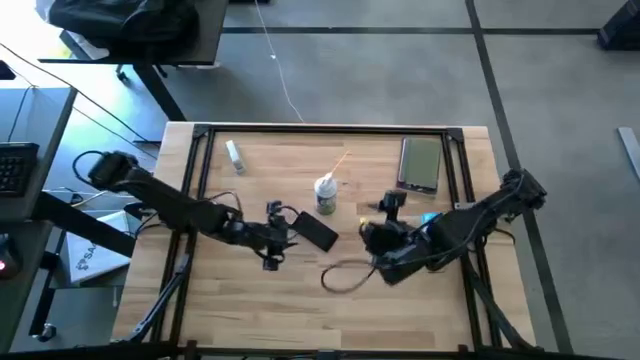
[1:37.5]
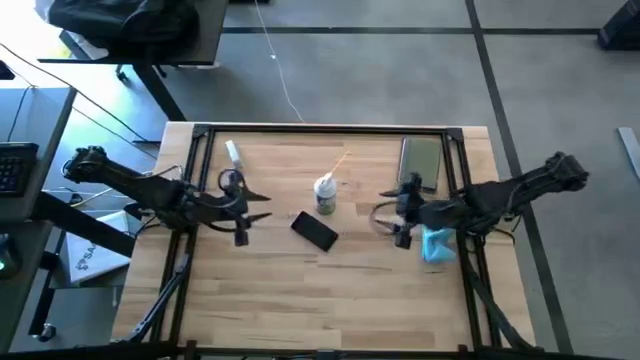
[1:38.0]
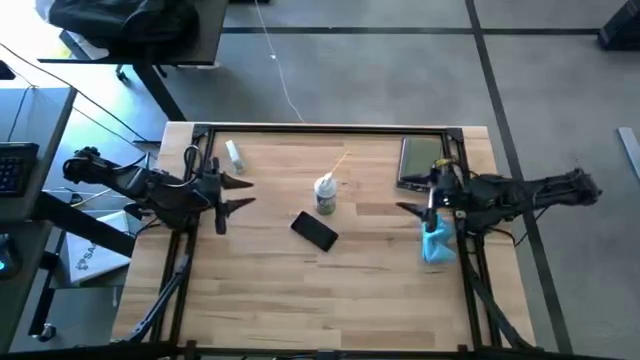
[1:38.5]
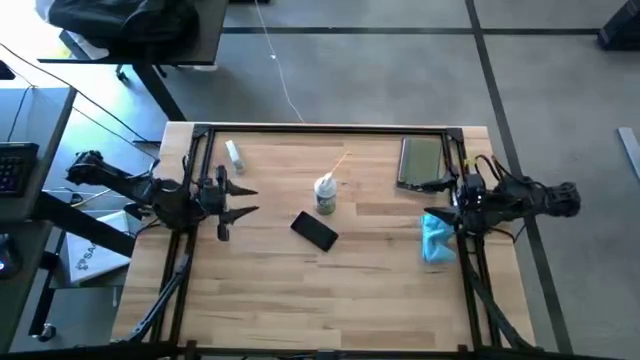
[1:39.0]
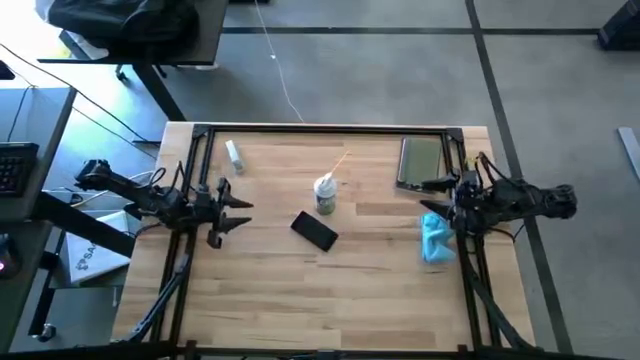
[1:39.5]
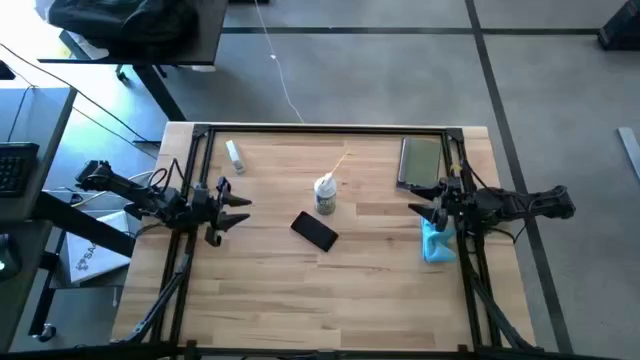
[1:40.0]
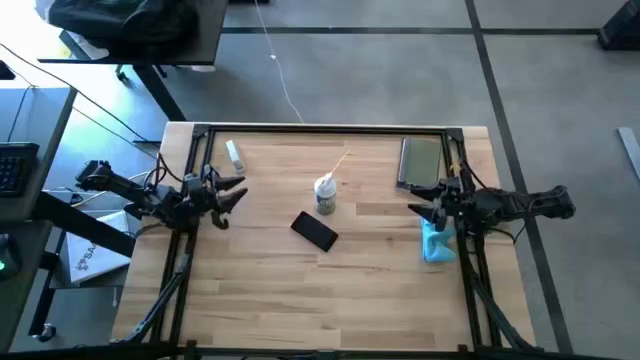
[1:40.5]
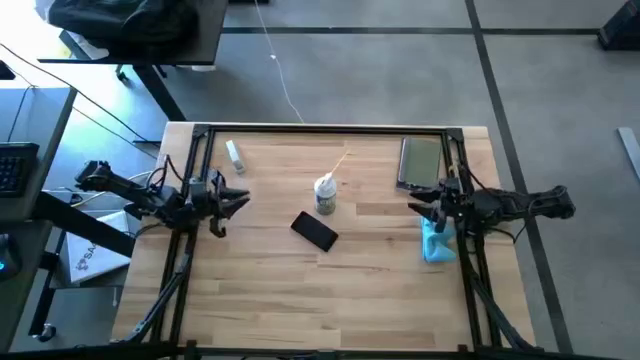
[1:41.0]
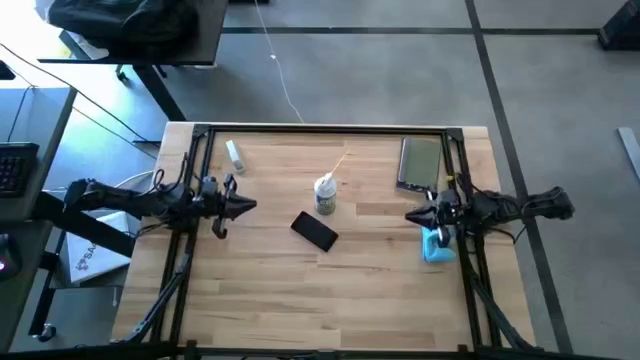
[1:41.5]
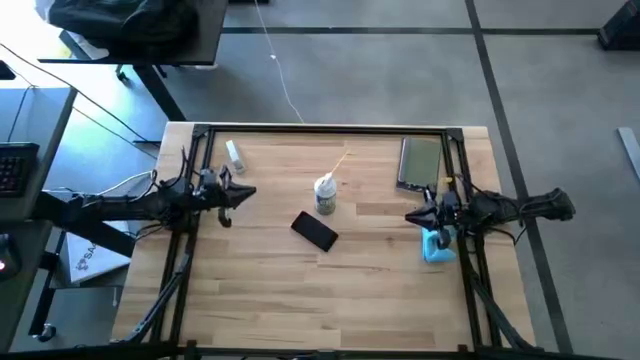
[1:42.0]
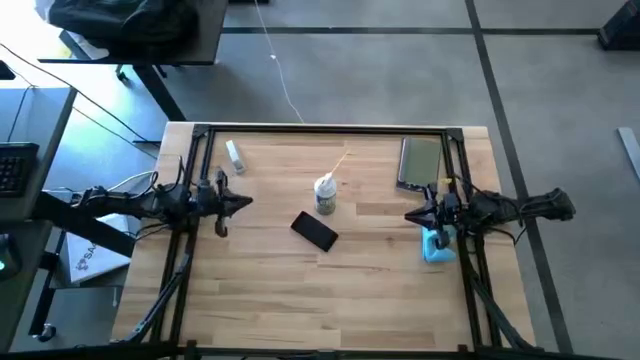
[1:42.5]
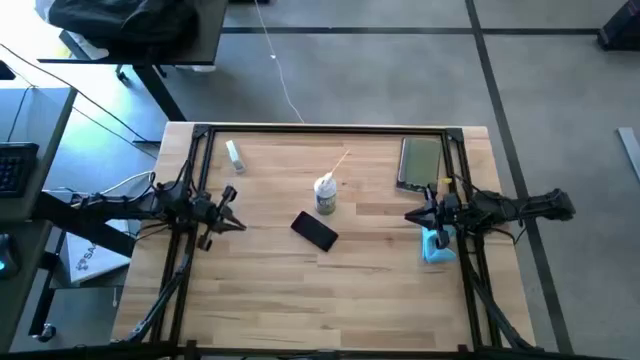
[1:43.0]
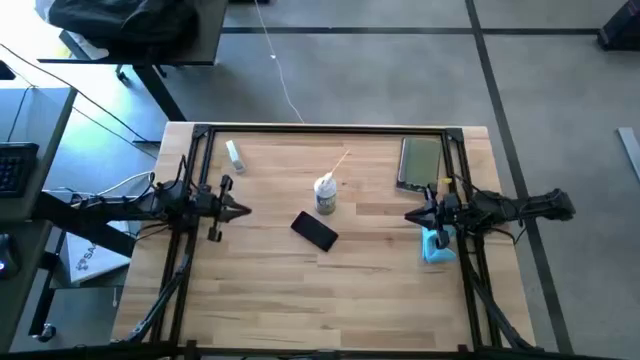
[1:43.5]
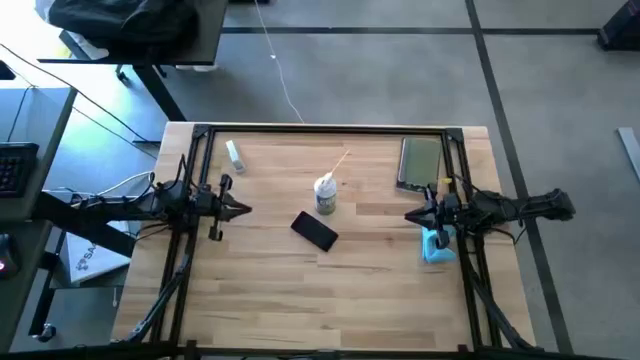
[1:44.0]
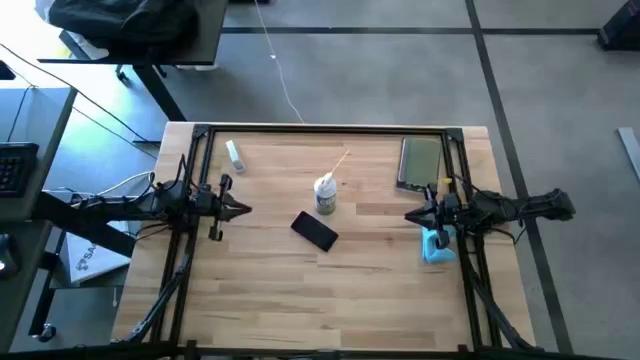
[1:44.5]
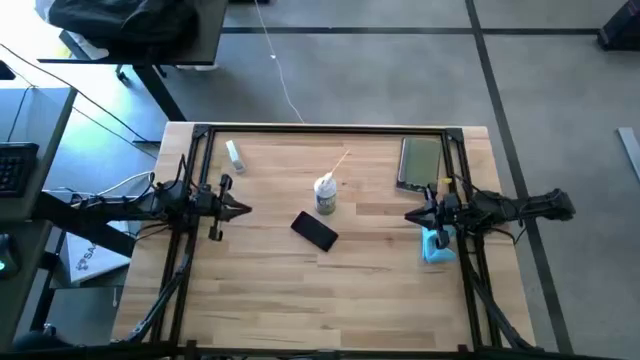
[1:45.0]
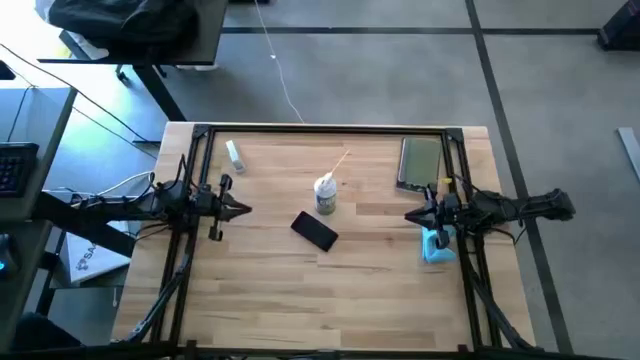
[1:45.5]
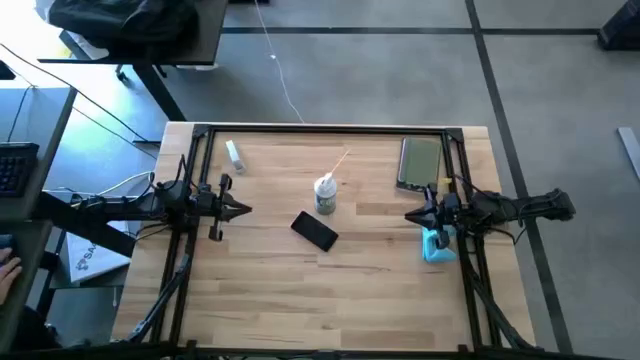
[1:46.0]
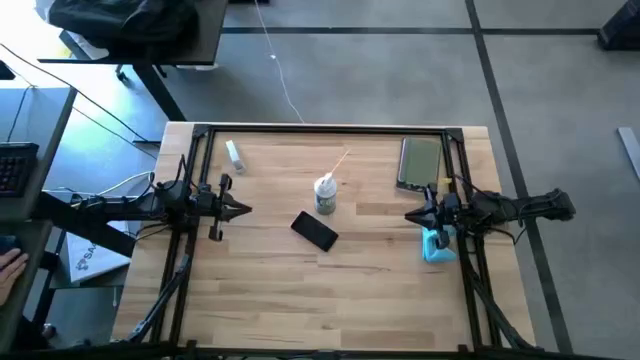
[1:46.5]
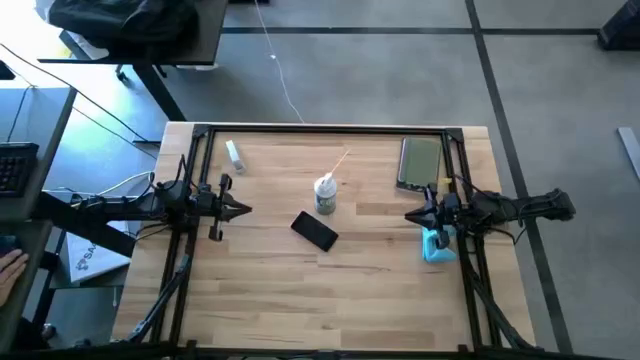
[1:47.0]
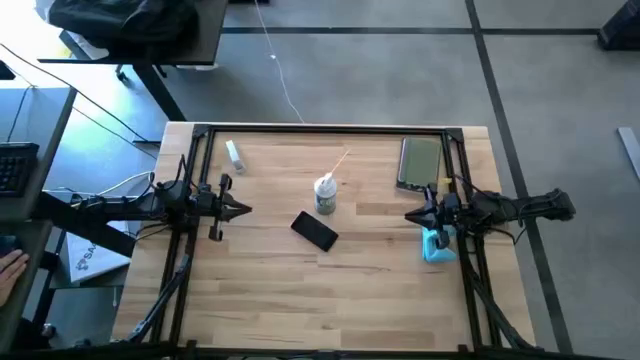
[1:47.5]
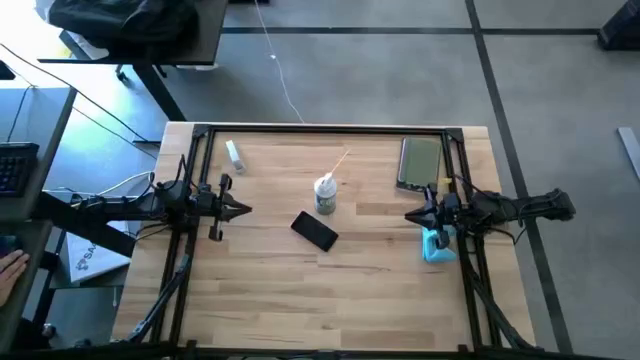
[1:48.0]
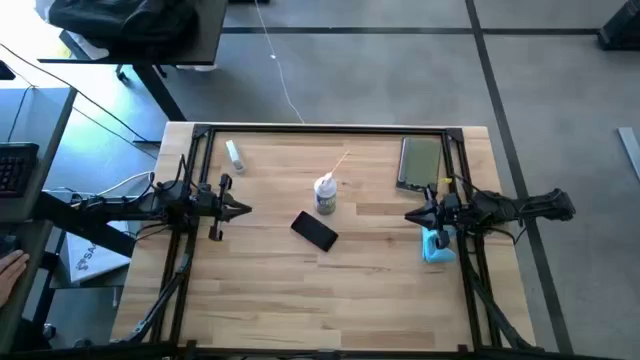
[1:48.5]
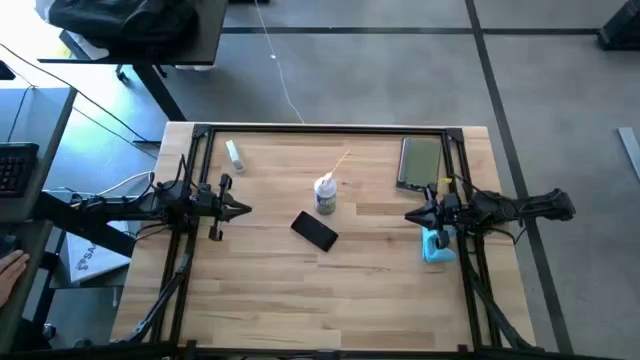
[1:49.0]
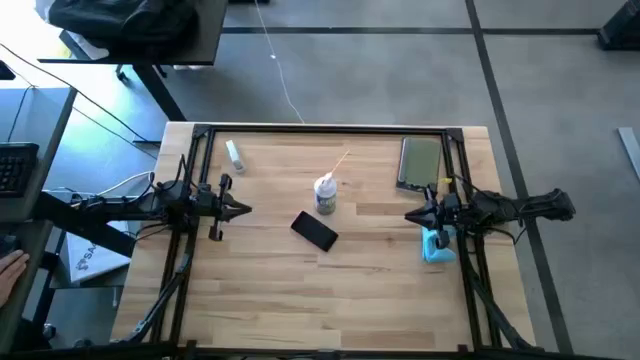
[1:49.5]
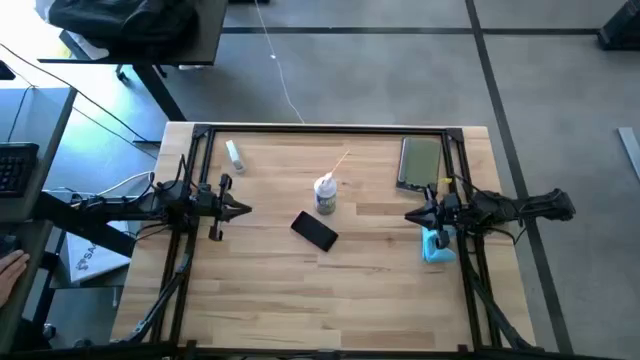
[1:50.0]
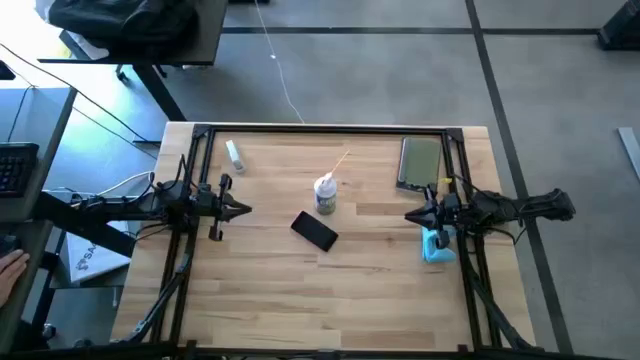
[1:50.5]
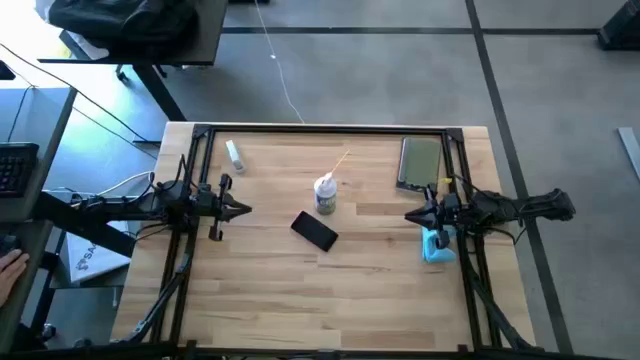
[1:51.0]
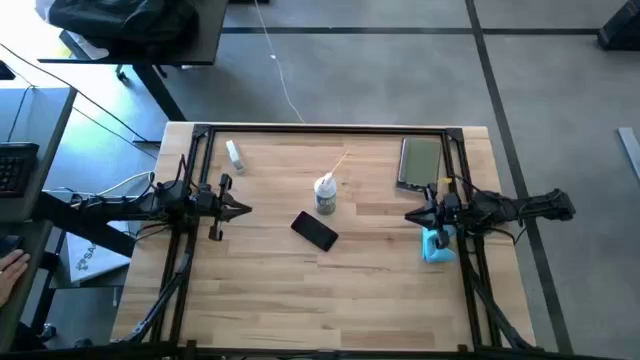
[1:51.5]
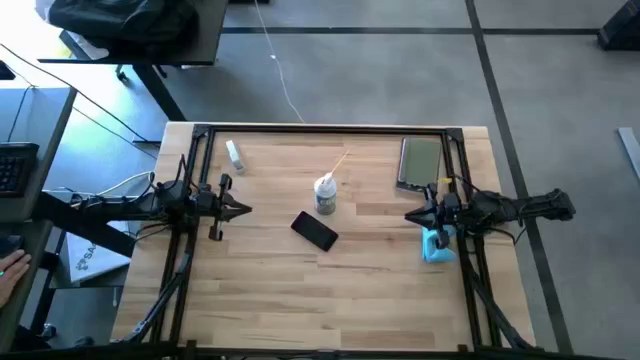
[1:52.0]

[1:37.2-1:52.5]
Task: Apply microfiber cloth
Return to Home Position

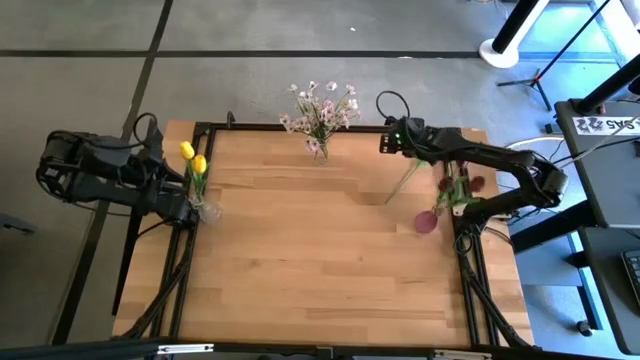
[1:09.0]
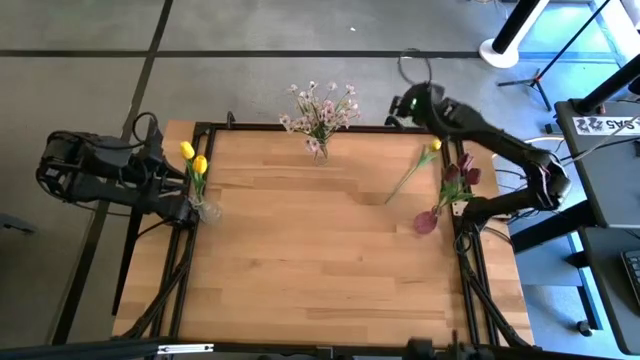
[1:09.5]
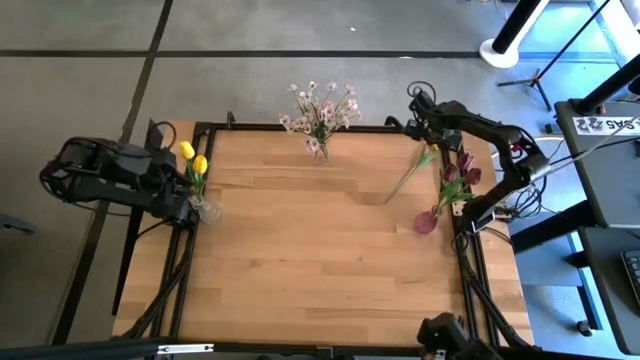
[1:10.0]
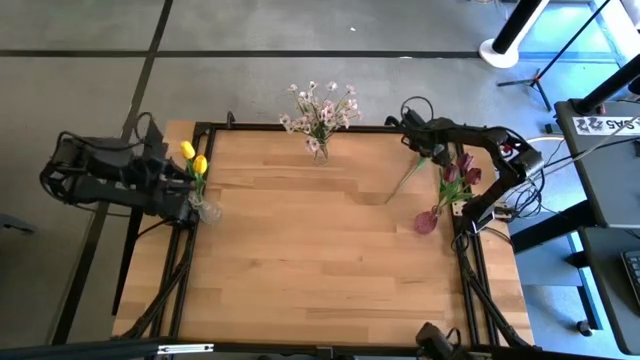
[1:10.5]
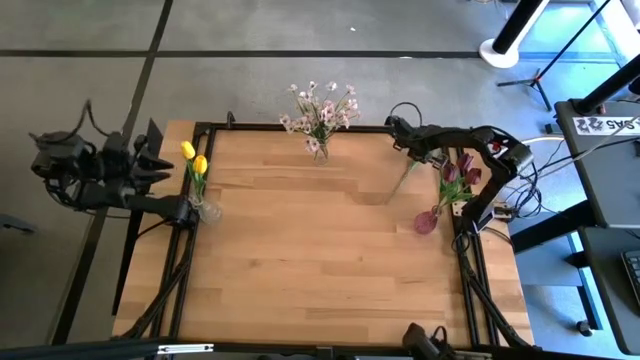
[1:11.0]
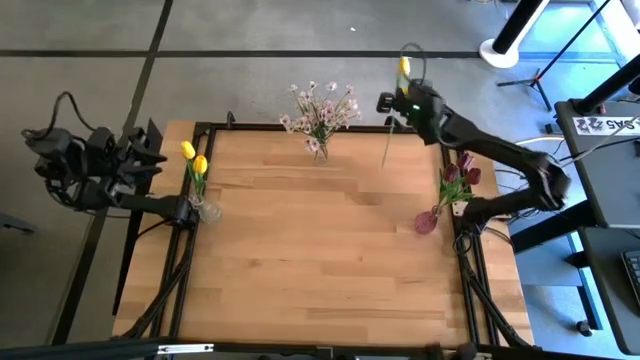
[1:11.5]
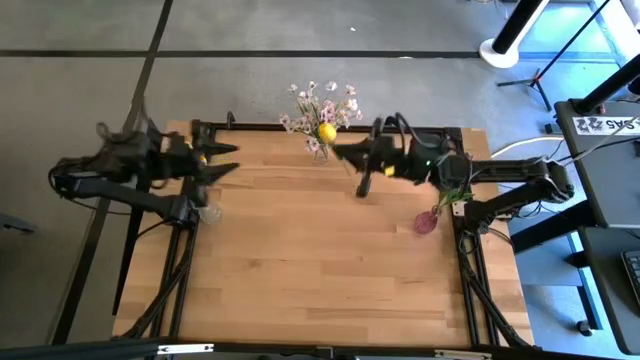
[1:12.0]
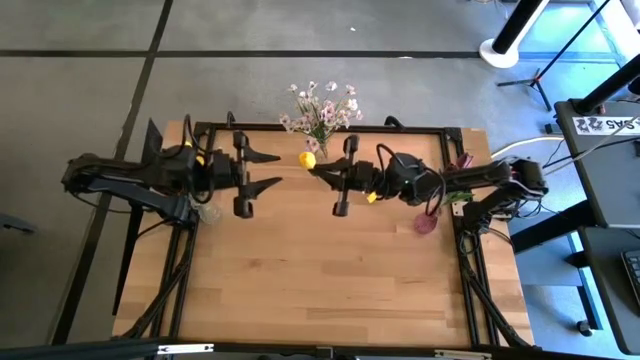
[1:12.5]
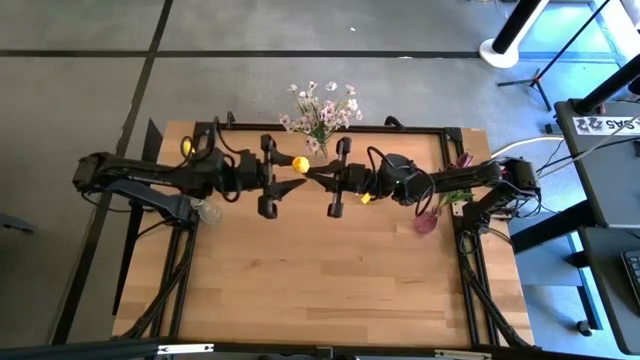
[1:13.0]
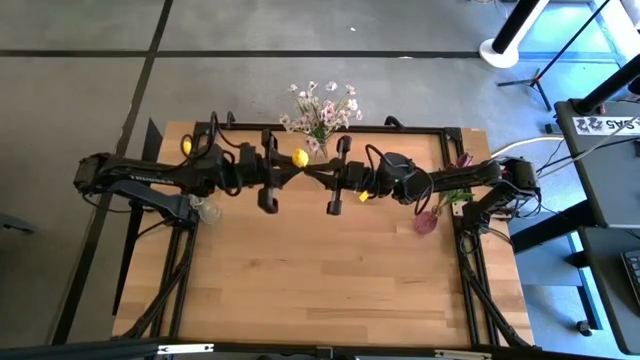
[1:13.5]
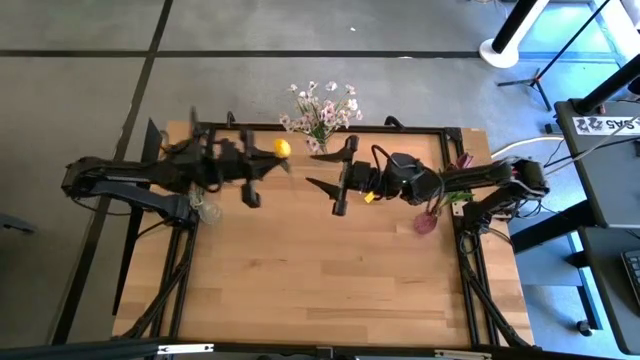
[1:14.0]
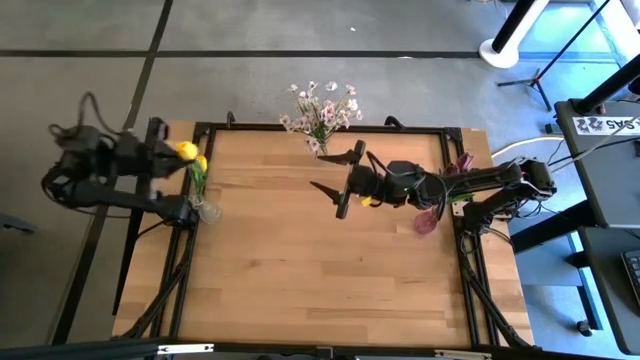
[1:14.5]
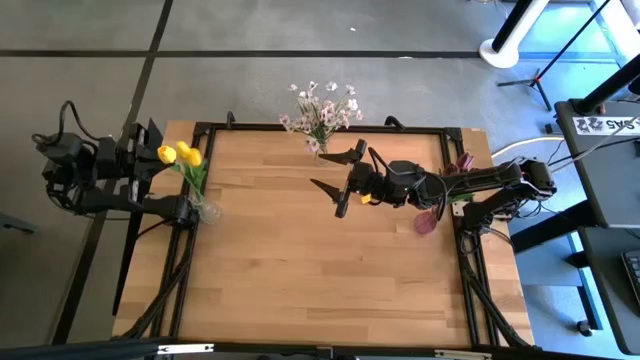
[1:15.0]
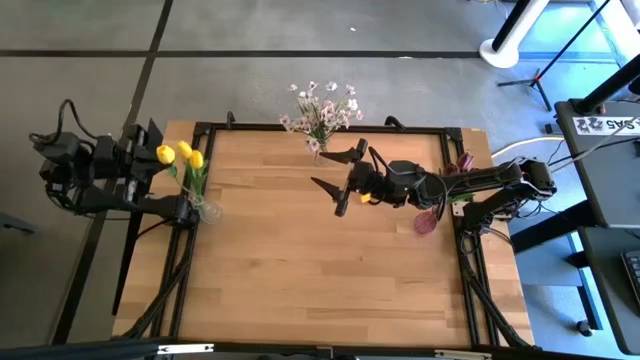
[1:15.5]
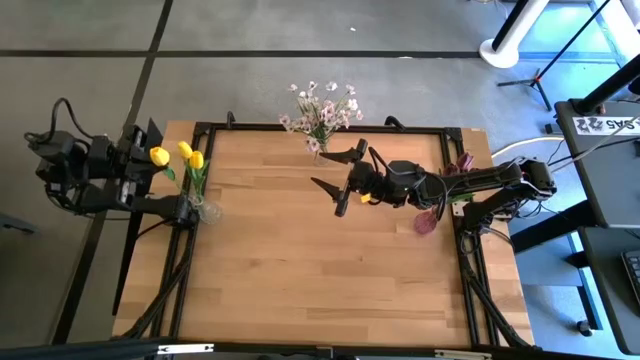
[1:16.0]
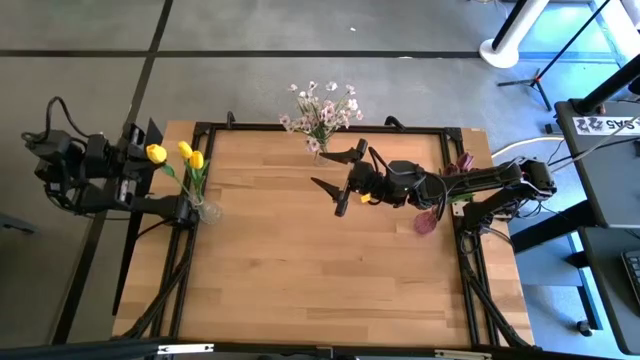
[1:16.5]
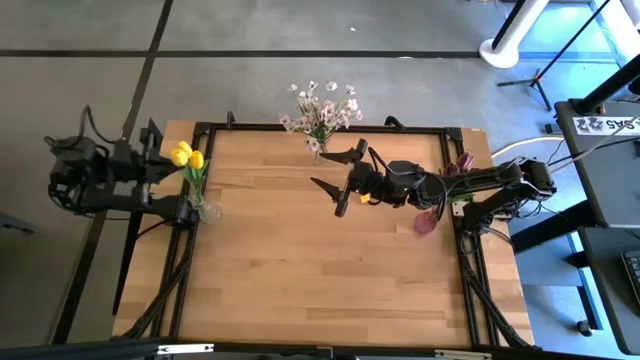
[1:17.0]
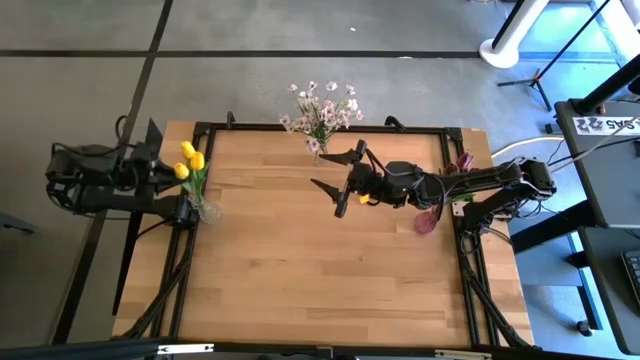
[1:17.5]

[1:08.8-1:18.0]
Task: Sort flowers into vase by color
Put the yellow flower into the bottom transparent vase
